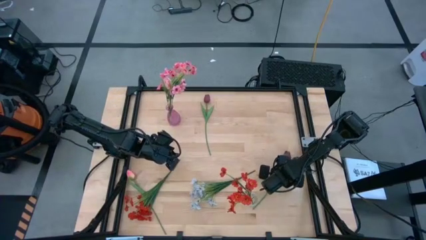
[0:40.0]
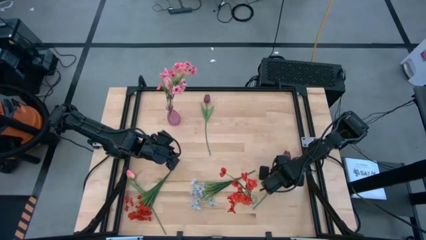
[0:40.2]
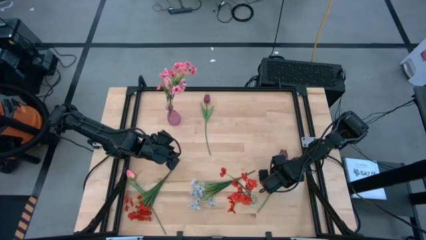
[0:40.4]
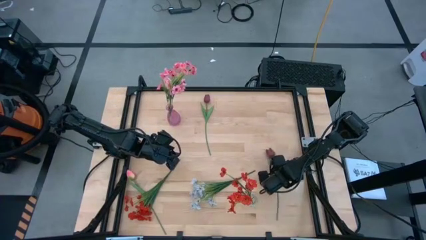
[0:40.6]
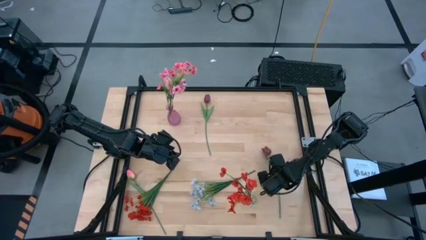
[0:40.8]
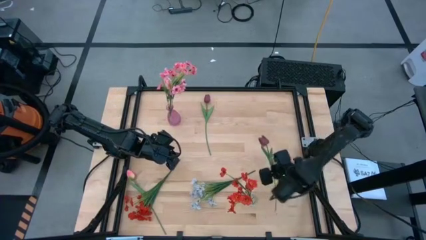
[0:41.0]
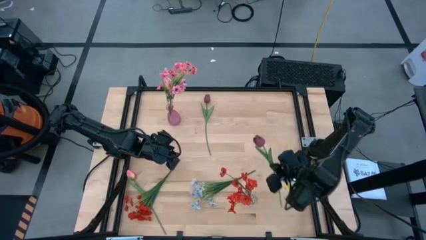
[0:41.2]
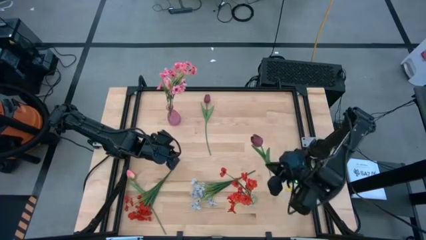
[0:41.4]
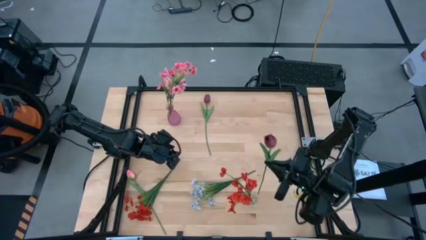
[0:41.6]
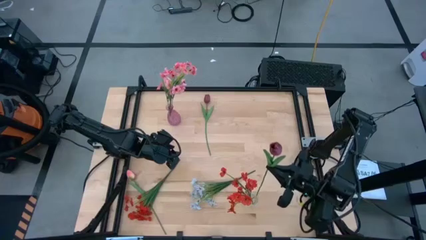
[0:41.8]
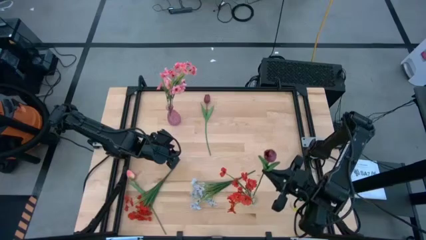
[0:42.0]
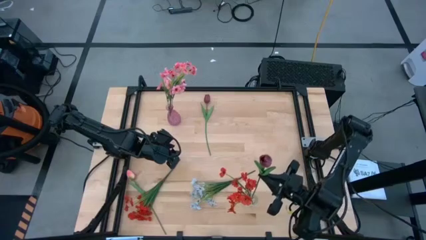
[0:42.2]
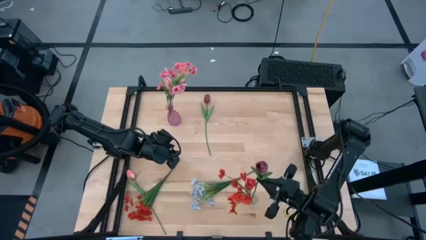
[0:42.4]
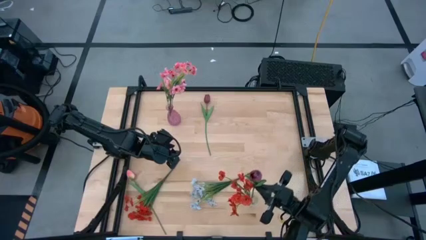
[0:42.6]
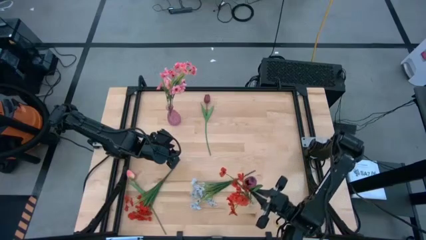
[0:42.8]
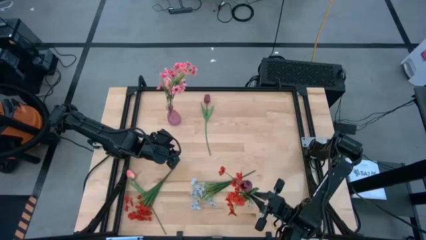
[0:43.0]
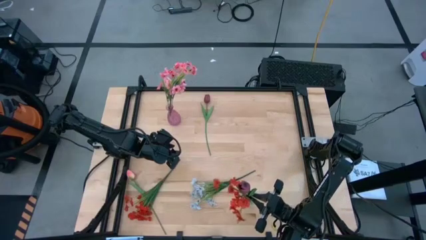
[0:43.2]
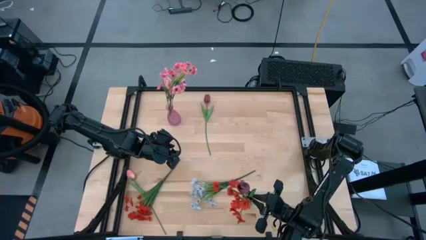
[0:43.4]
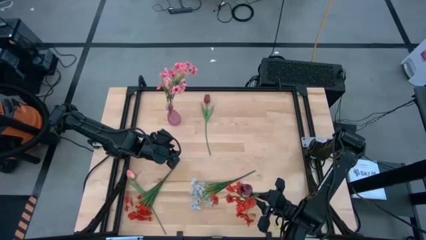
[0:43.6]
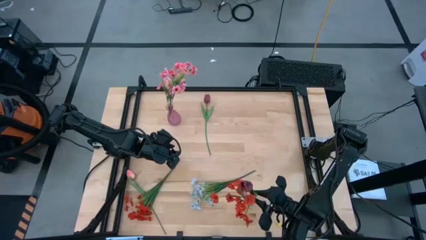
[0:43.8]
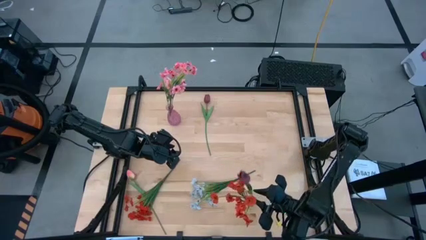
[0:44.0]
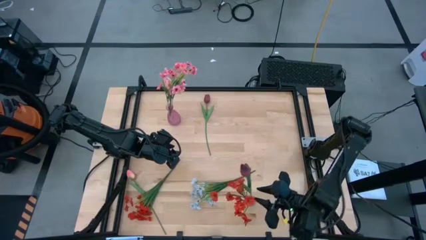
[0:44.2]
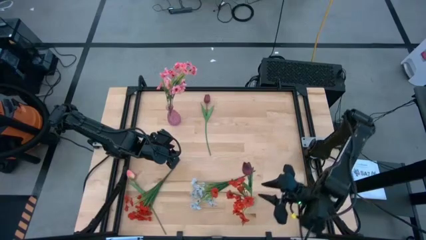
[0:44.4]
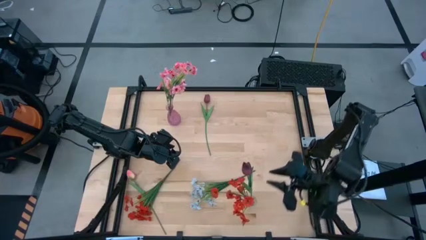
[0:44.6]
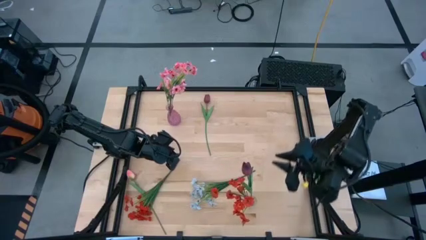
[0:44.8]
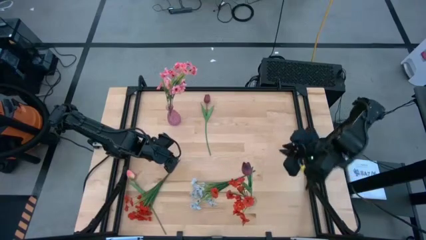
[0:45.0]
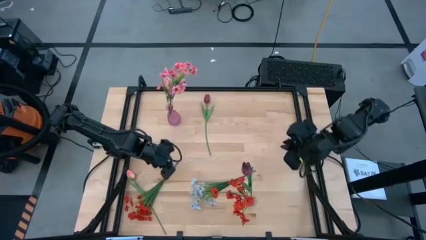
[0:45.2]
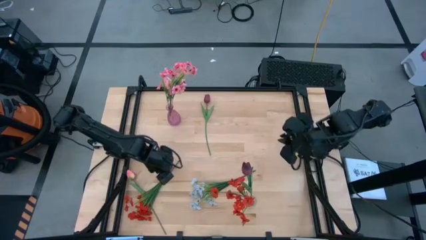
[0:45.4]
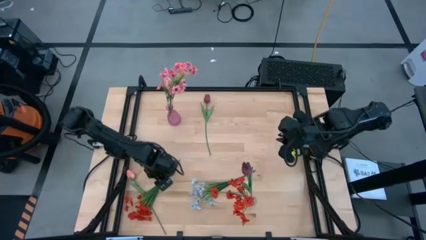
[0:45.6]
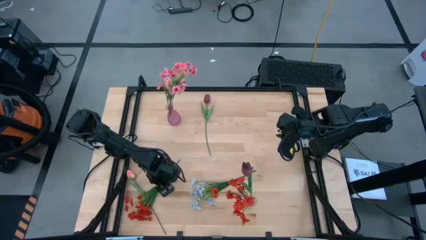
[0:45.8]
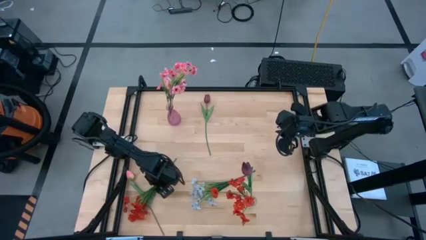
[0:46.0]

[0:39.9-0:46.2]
Task: Sort flowers into vase by color
Put the right red tulip into the transparent vase

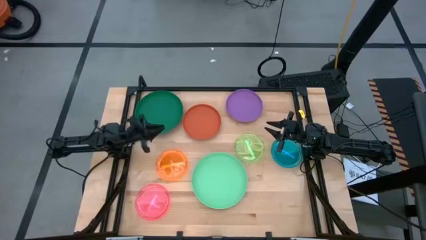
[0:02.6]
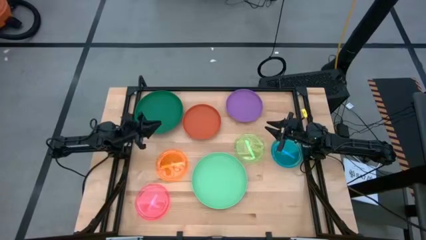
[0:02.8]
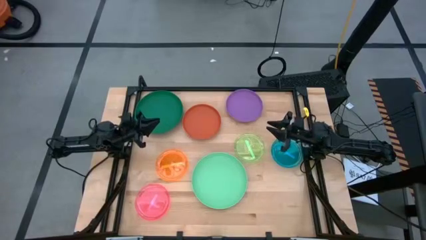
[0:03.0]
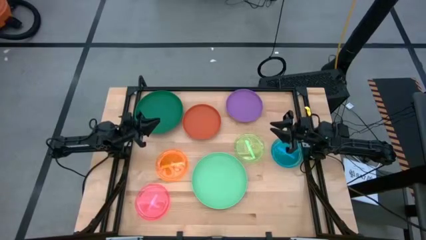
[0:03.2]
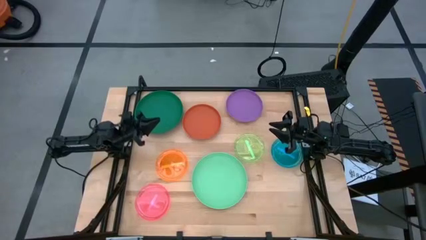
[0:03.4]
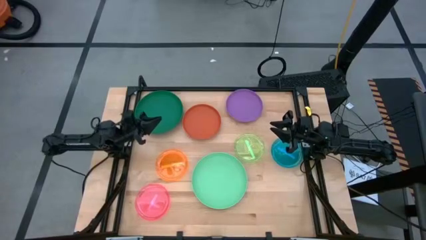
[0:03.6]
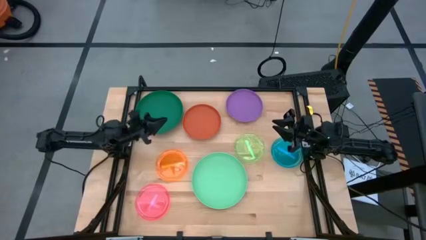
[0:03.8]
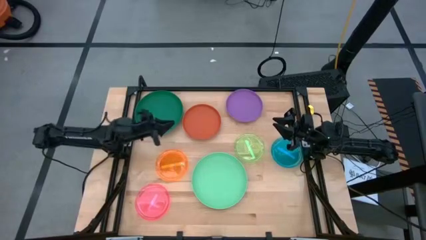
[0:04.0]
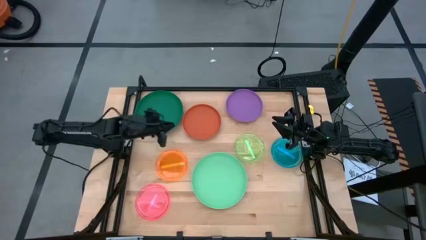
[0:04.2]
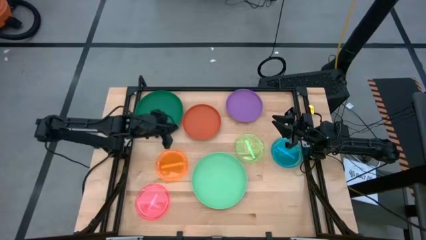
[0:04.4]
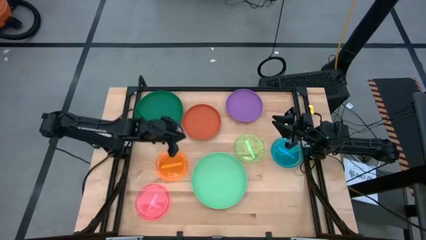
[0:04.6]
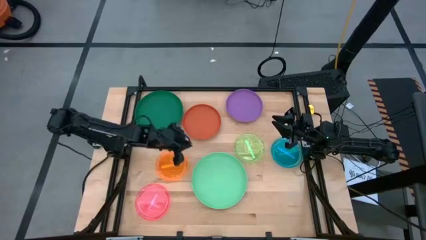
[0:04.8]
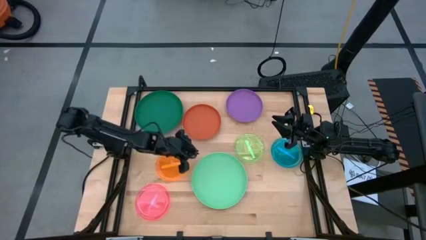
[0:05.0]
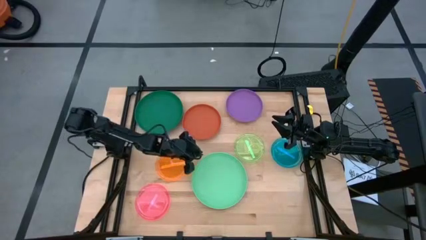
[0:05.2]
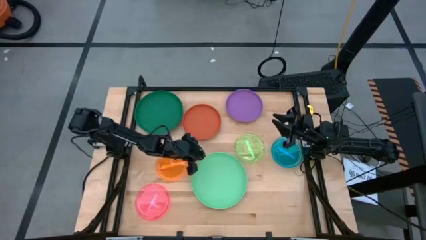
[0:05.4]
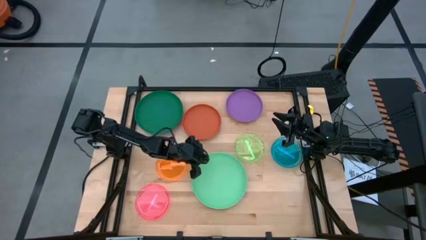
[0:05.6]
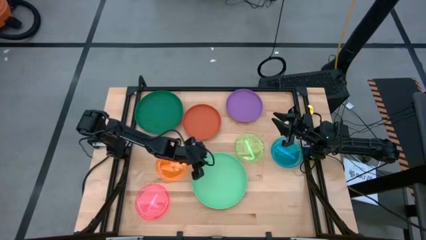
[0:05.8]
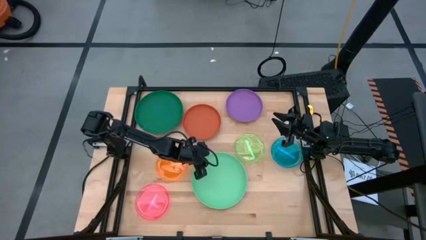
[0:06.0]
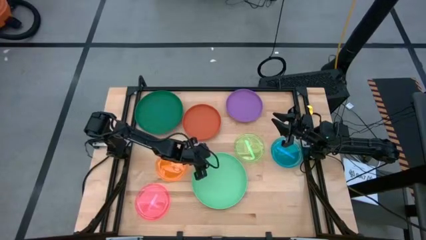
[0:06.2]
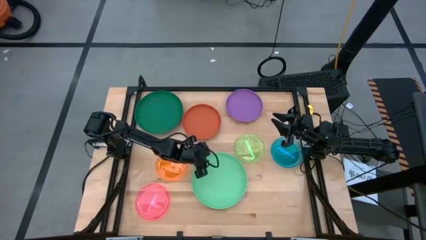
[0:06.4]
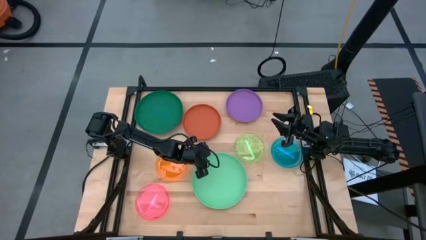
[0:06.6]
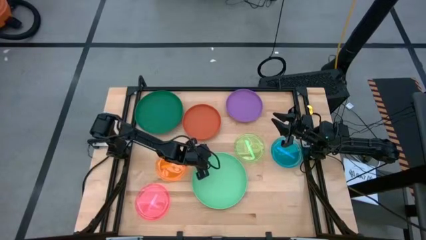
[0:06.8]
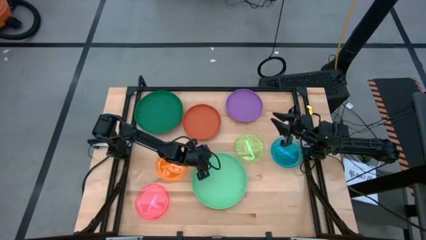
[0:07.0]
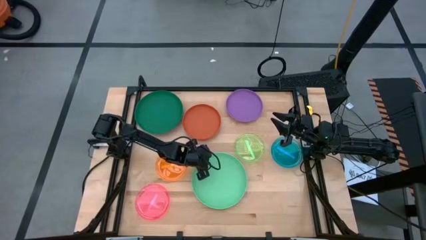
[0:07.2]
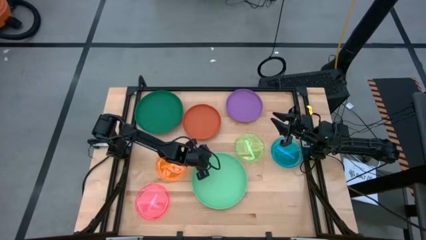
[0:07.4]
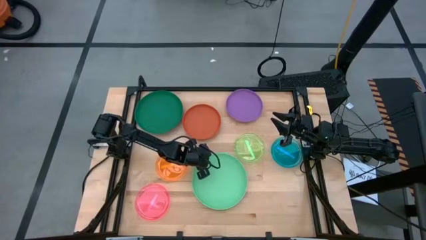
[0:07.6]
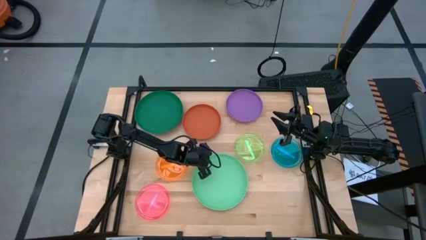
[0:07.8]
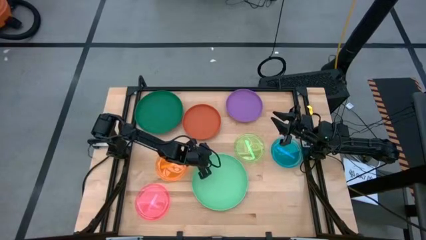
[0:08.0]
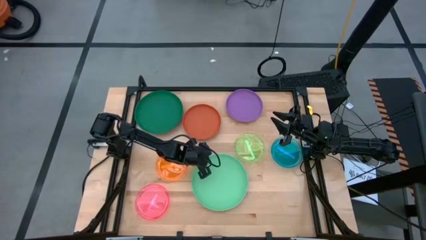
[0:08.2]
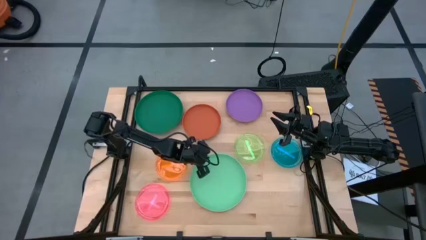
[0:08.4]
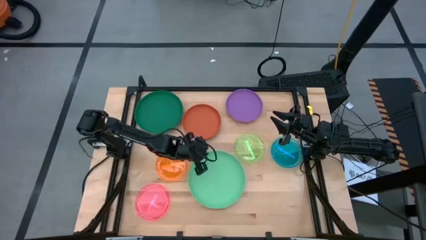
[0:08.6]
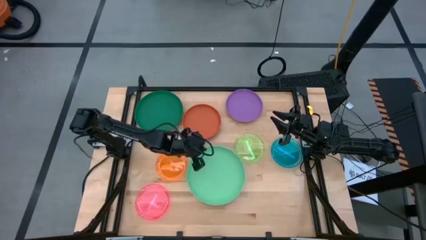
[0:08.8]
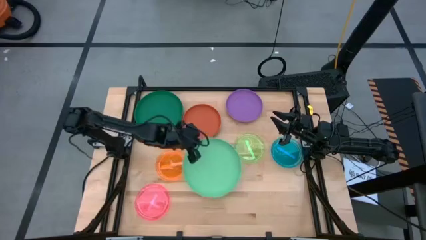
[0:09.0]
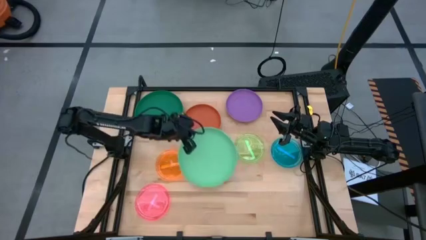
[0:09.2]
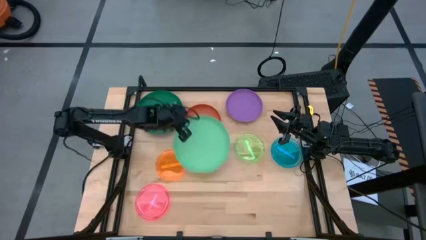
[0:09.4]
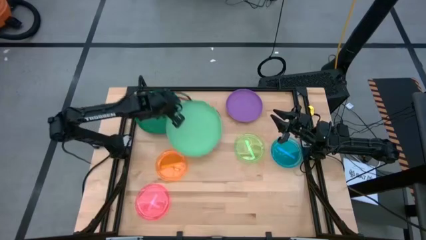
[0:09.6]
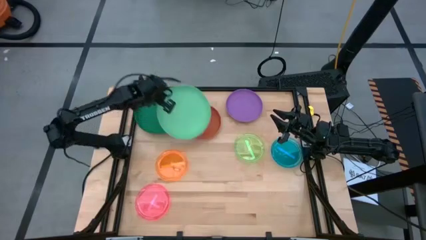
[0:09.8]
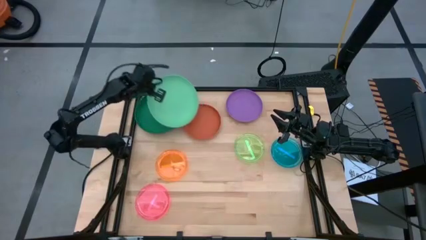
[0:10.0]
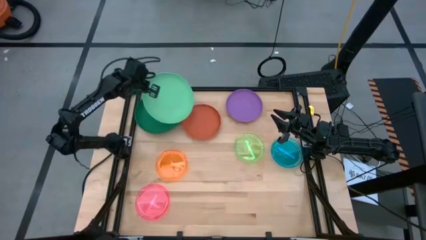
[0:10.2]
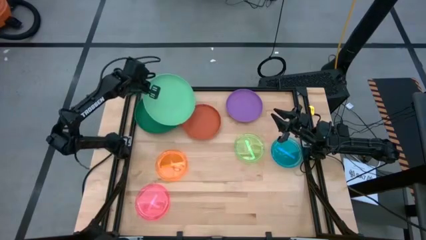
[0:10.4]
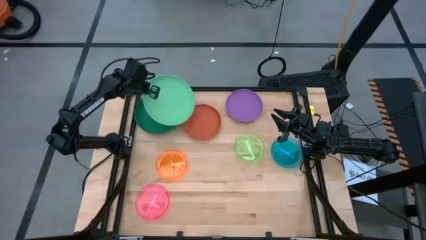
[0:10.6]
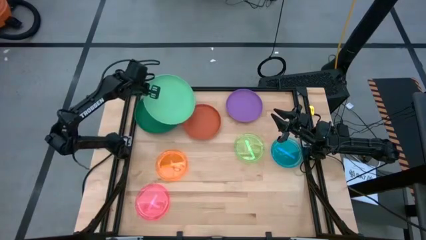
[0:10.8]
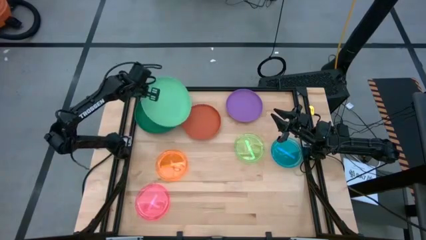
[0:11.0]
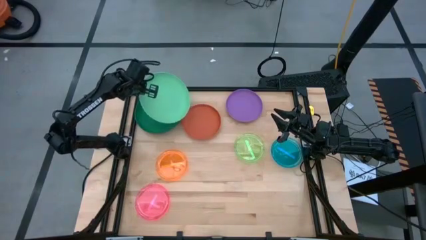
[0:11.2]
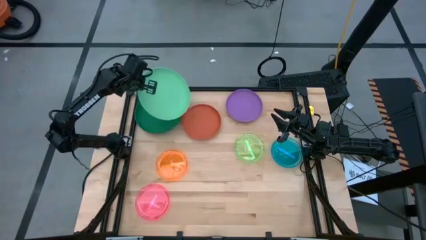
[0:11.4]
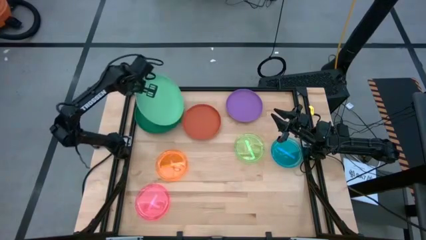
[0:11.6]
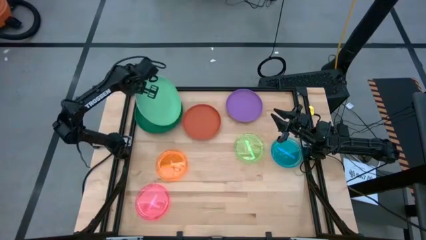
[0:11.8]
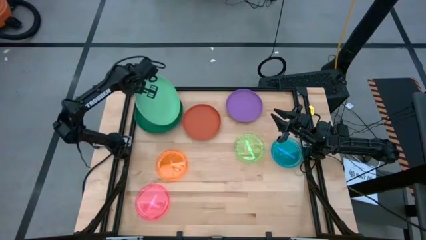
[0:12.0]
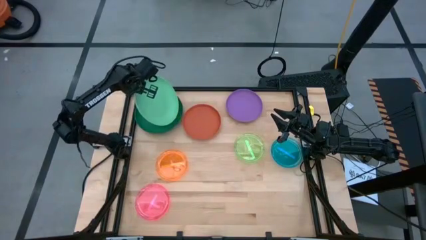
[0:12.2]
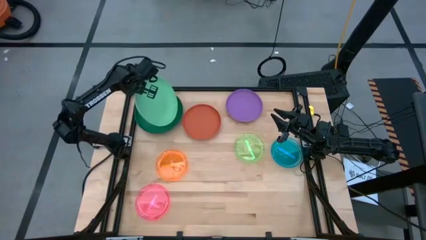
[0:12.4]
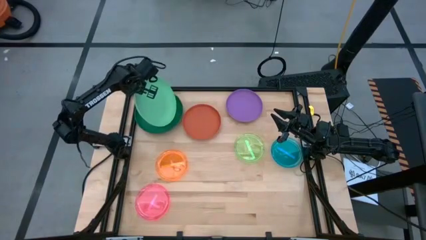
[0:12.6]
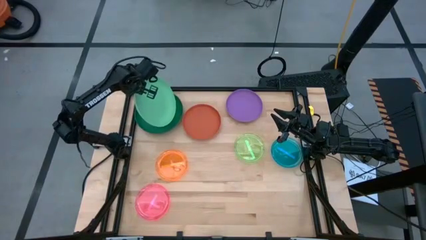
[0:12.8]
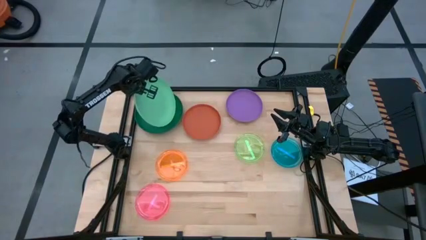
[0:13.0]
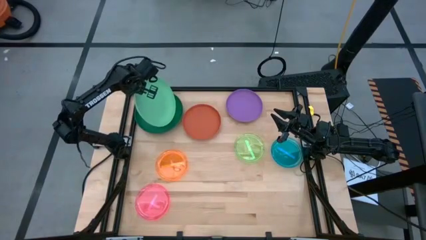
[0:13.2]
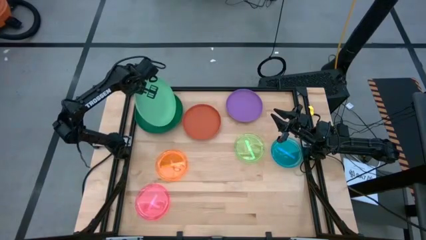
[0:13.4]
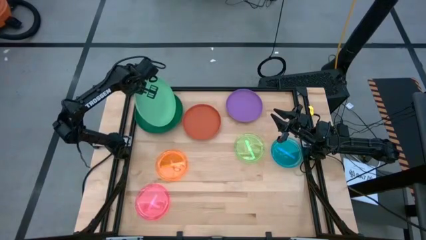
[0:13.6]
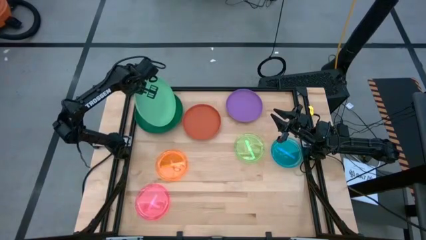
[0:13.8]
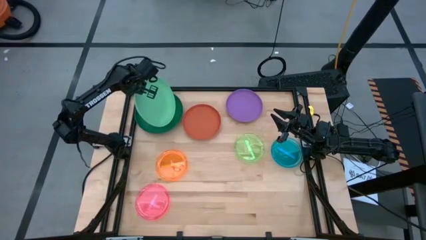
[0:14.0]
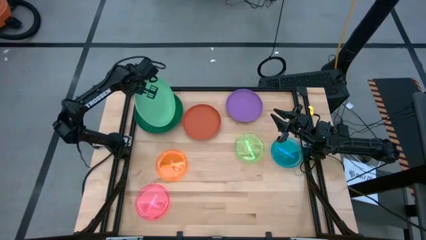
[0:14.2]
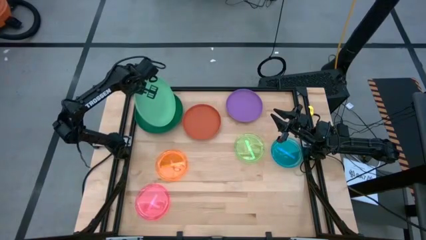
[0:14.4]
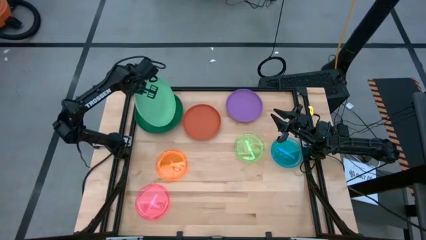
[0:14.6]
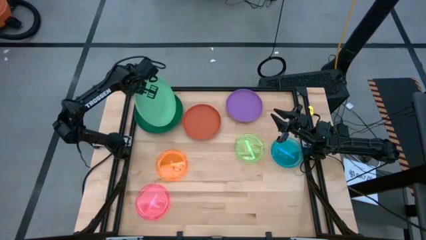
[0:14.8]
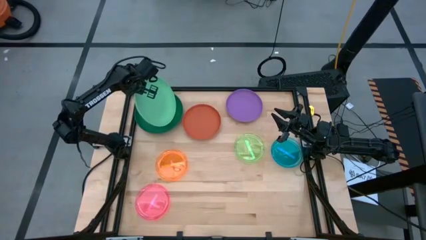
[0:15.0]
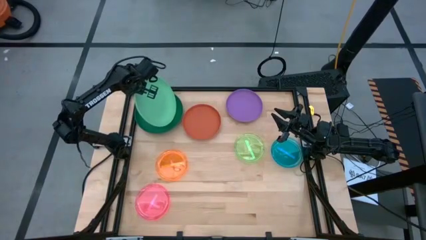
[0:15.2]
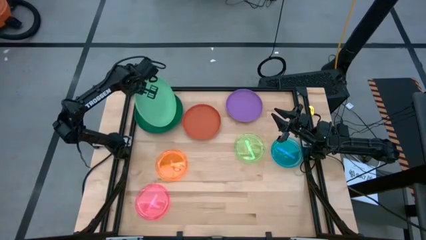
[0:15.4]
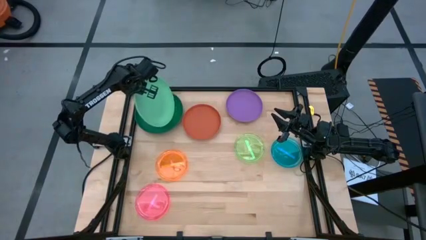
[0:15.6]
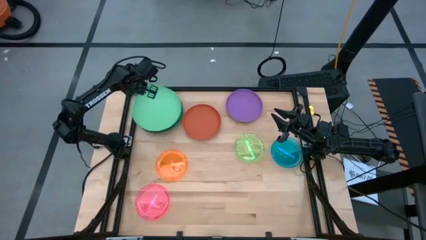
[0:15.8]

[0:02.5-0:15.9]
Task: Stack plastic plates
Stack the light green plate on top of the dark green plate
